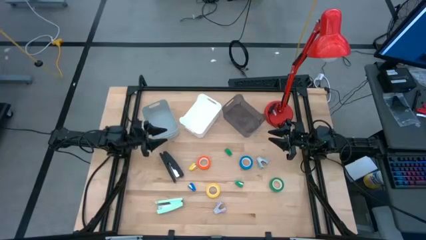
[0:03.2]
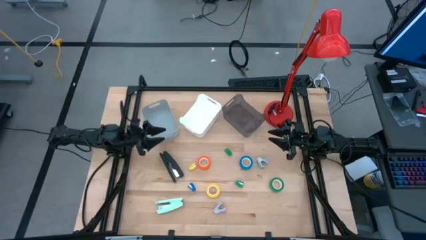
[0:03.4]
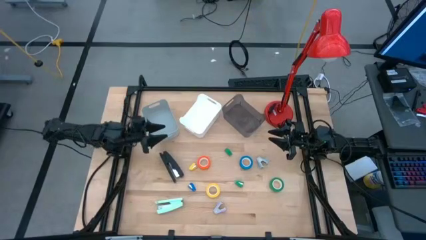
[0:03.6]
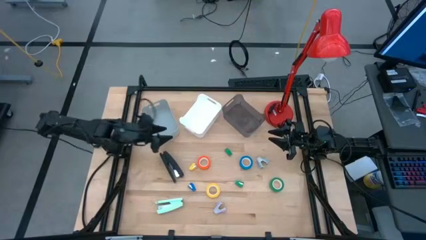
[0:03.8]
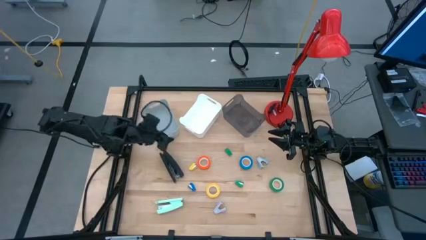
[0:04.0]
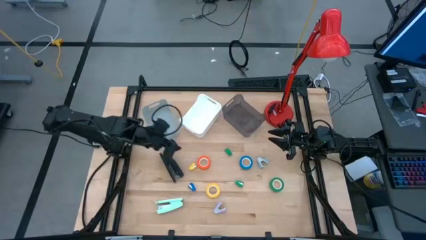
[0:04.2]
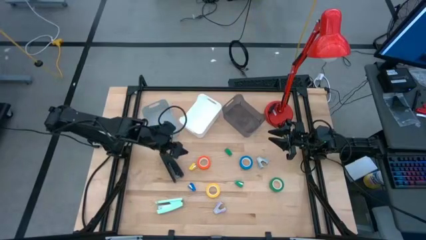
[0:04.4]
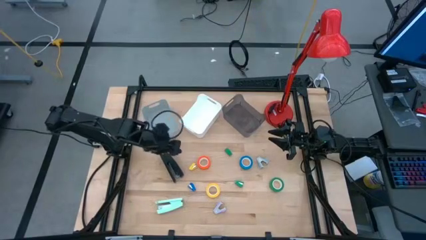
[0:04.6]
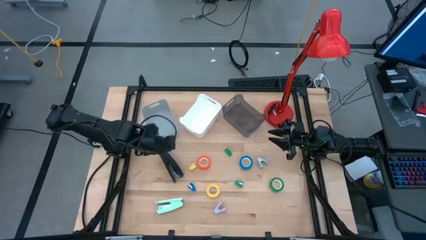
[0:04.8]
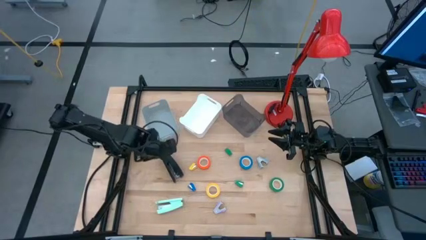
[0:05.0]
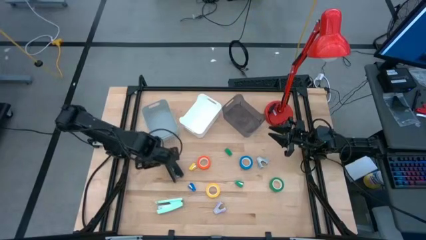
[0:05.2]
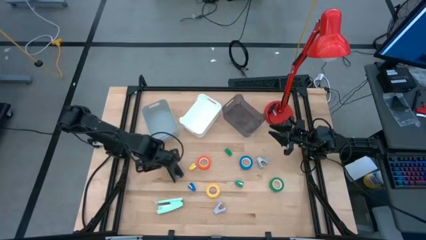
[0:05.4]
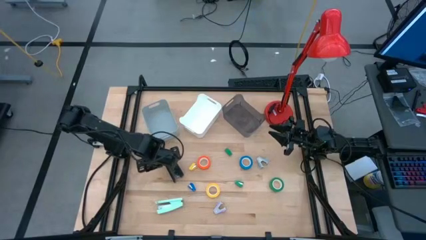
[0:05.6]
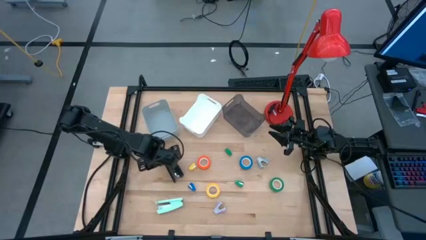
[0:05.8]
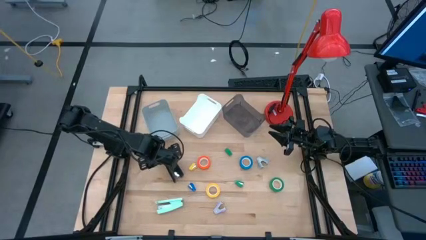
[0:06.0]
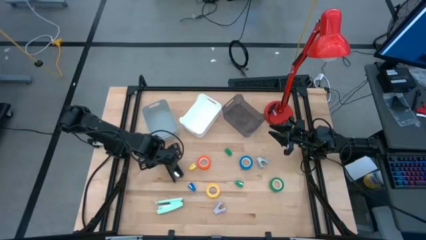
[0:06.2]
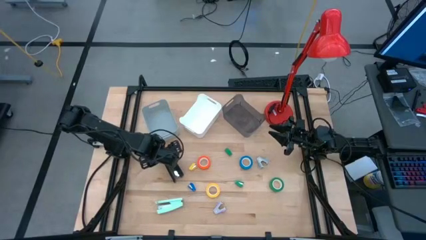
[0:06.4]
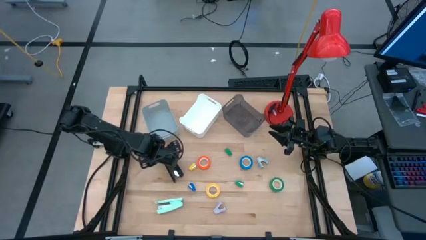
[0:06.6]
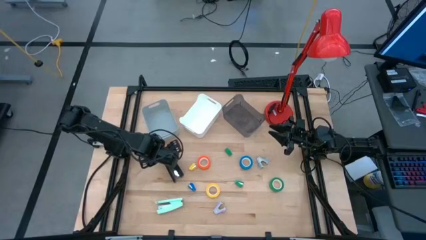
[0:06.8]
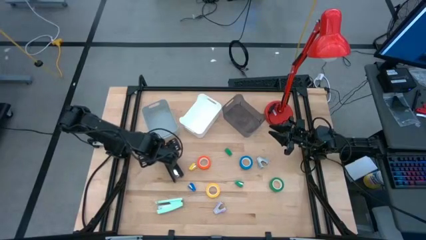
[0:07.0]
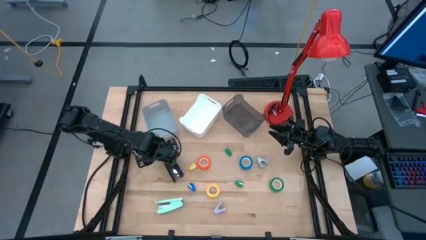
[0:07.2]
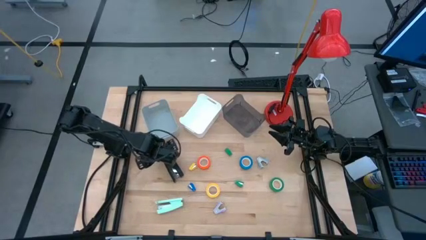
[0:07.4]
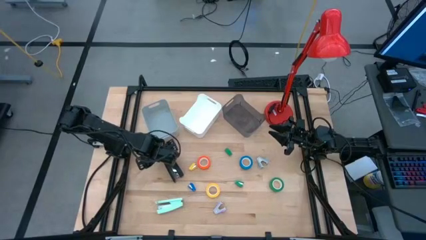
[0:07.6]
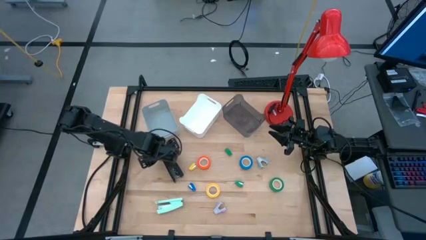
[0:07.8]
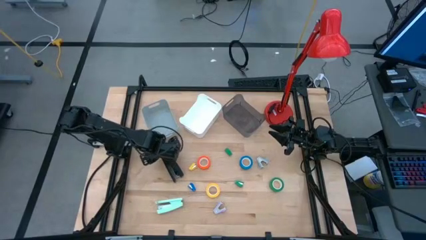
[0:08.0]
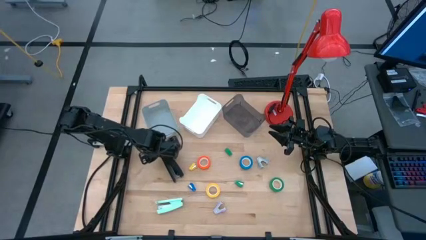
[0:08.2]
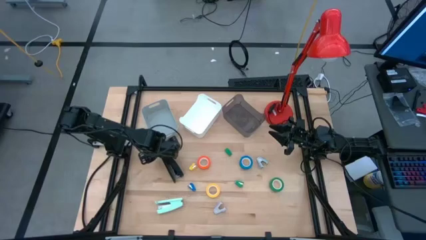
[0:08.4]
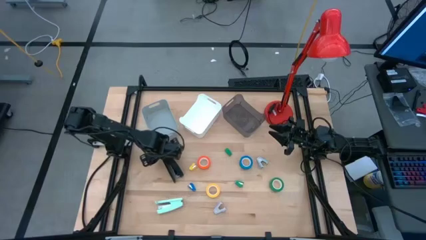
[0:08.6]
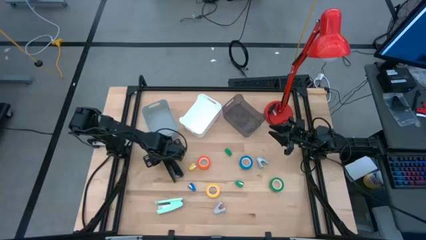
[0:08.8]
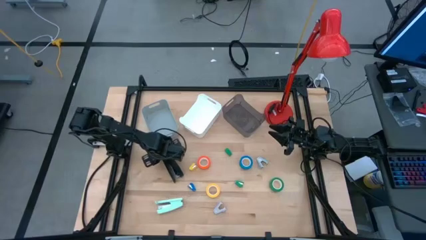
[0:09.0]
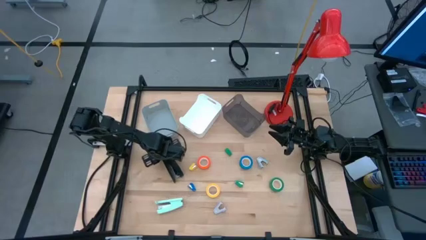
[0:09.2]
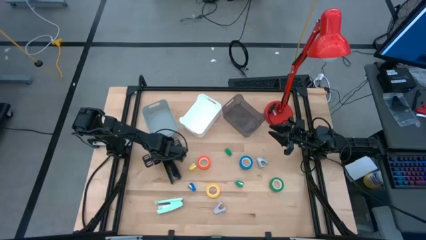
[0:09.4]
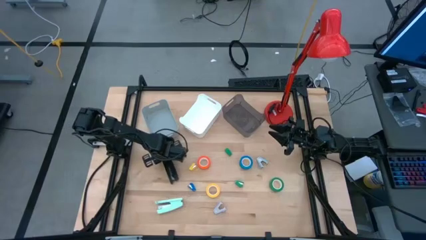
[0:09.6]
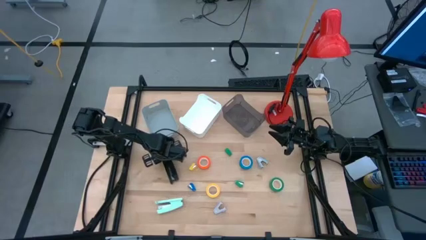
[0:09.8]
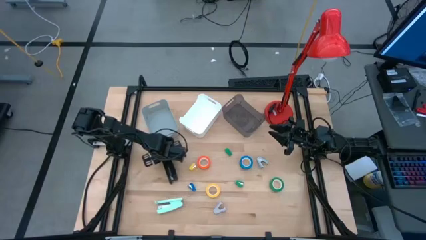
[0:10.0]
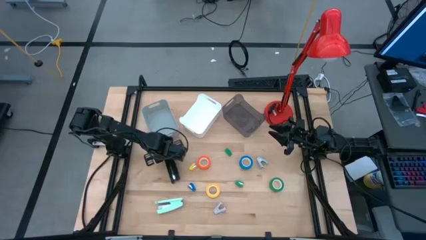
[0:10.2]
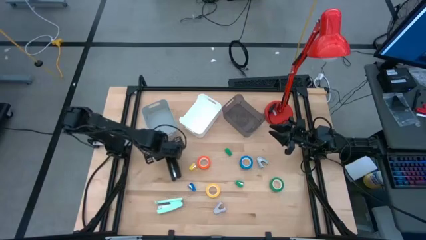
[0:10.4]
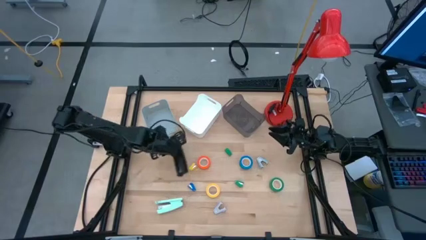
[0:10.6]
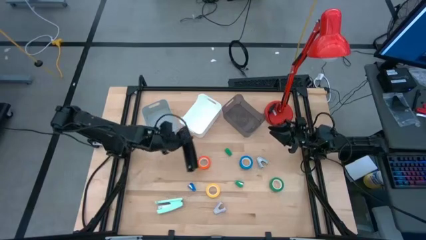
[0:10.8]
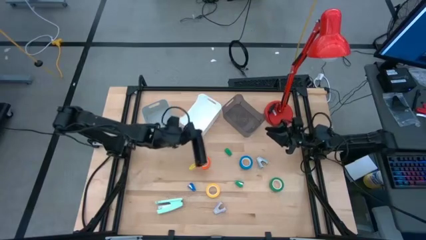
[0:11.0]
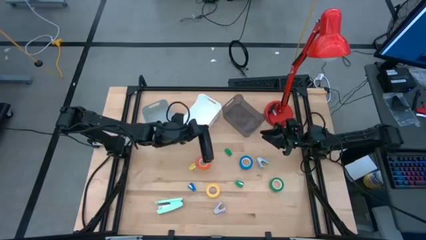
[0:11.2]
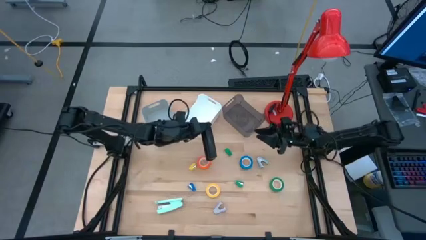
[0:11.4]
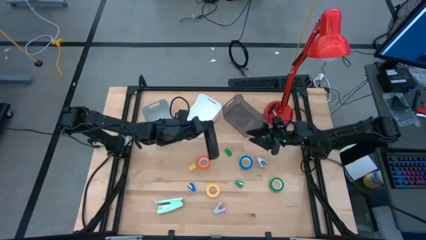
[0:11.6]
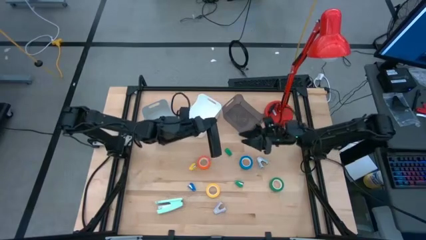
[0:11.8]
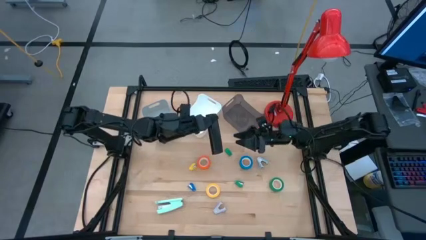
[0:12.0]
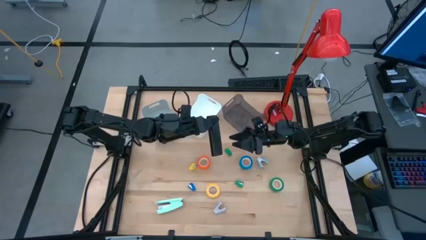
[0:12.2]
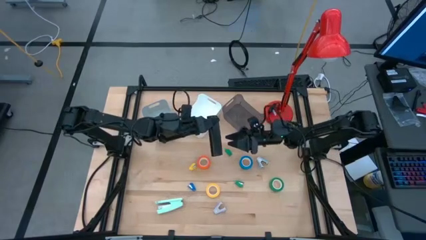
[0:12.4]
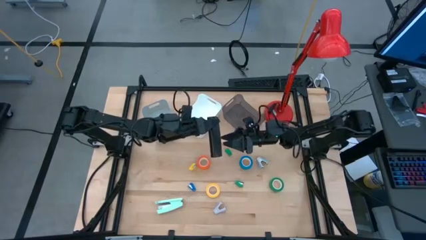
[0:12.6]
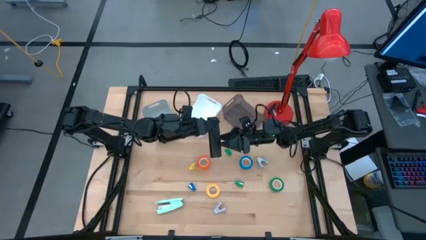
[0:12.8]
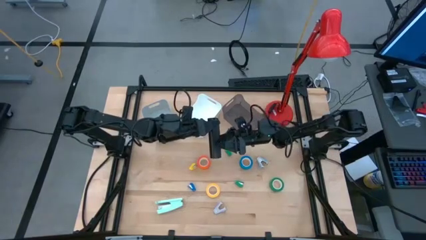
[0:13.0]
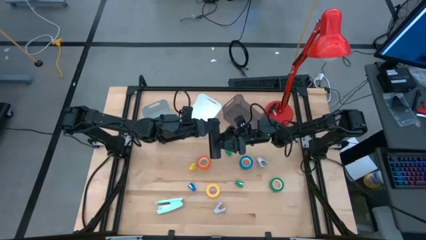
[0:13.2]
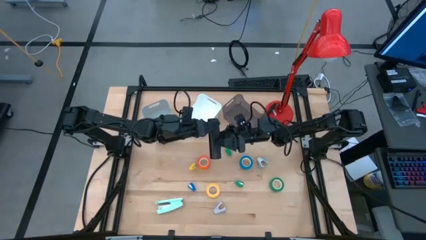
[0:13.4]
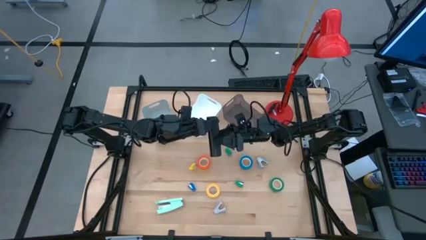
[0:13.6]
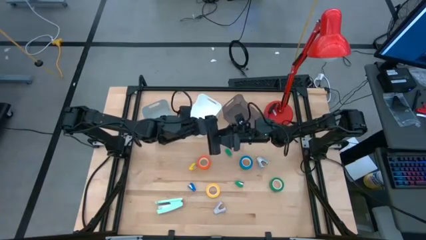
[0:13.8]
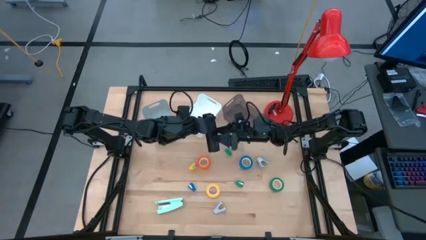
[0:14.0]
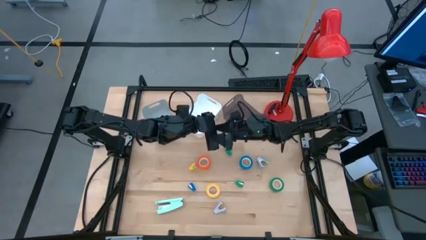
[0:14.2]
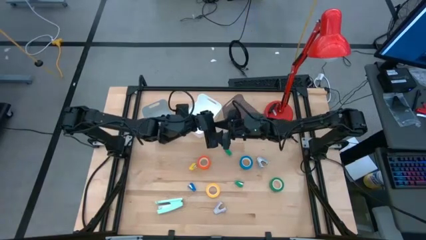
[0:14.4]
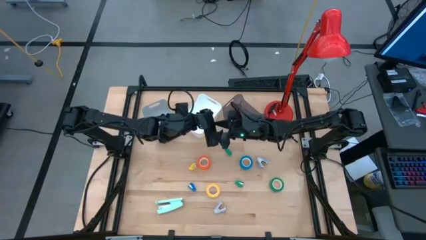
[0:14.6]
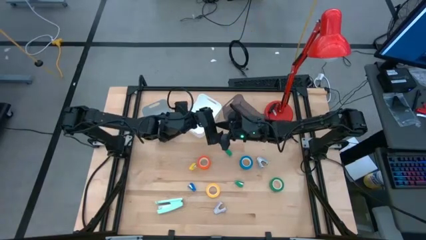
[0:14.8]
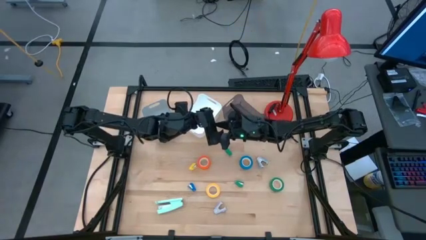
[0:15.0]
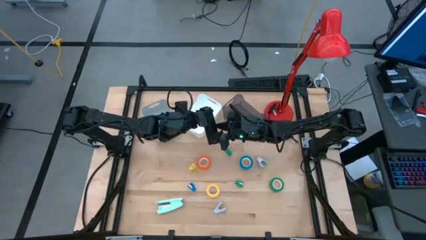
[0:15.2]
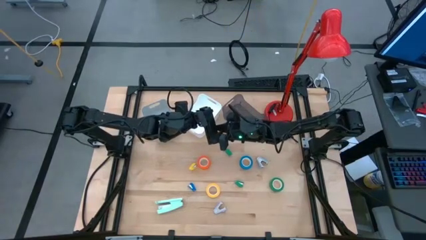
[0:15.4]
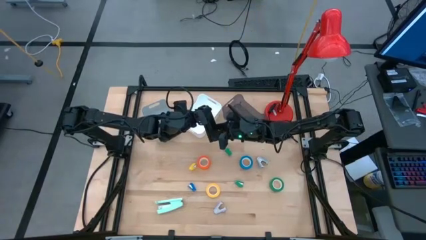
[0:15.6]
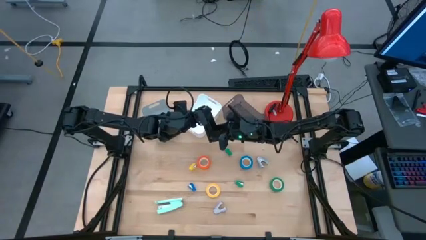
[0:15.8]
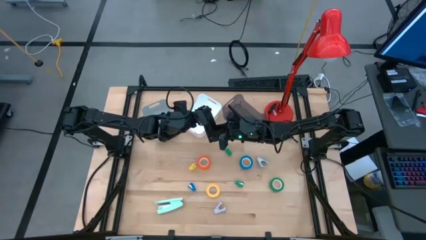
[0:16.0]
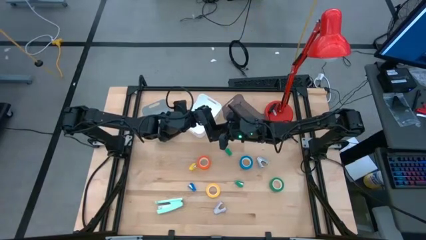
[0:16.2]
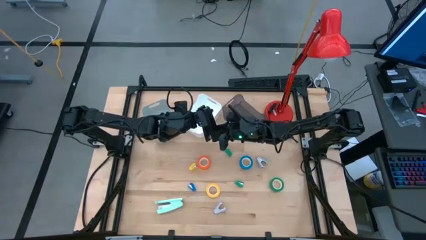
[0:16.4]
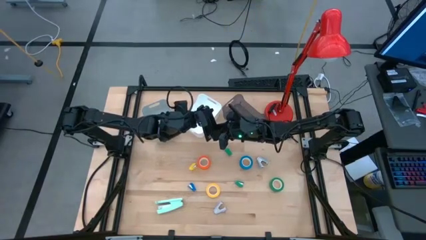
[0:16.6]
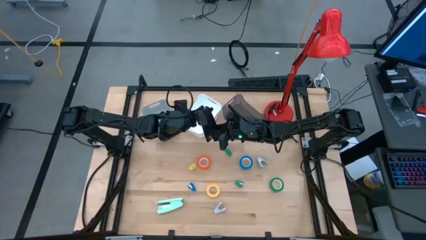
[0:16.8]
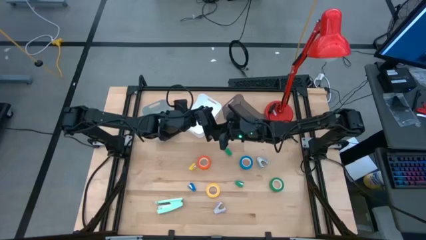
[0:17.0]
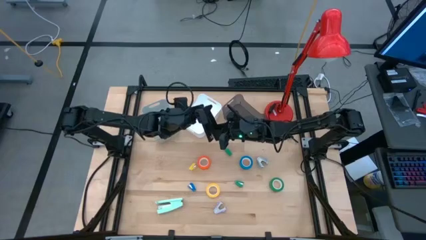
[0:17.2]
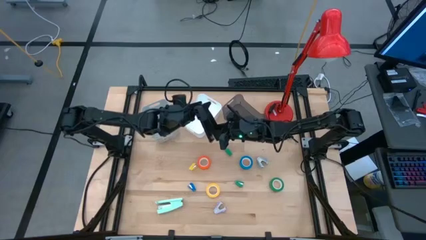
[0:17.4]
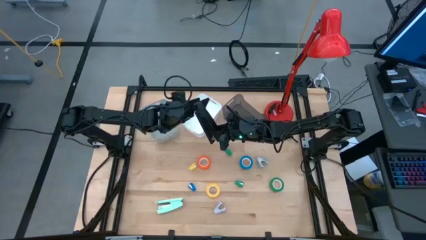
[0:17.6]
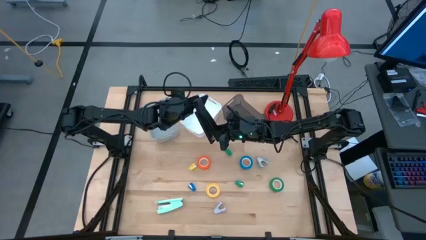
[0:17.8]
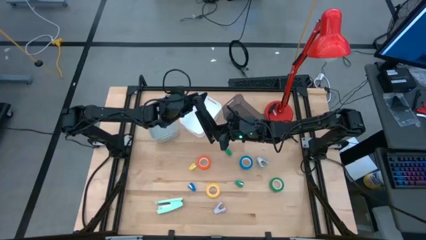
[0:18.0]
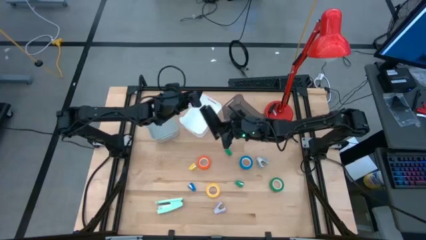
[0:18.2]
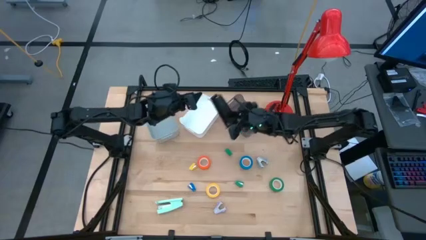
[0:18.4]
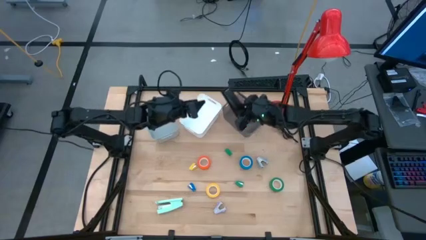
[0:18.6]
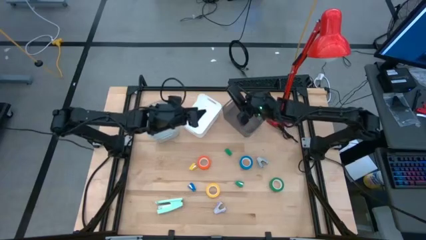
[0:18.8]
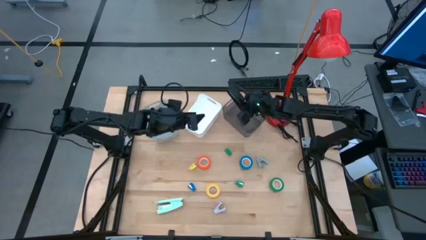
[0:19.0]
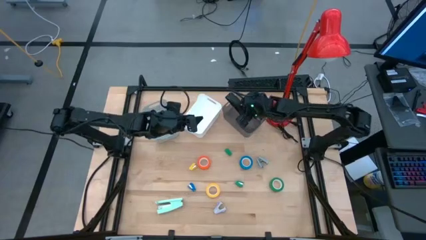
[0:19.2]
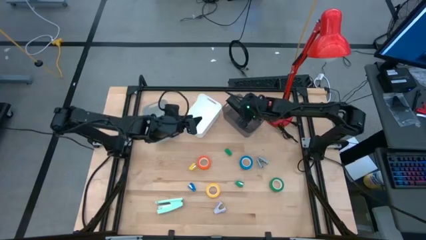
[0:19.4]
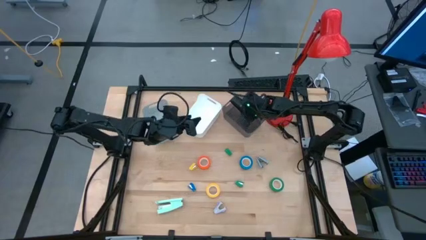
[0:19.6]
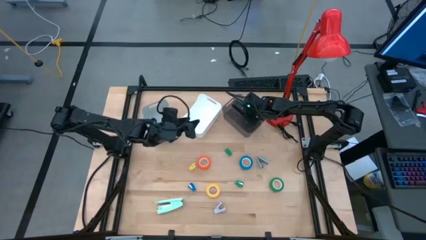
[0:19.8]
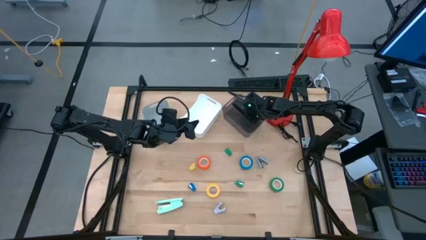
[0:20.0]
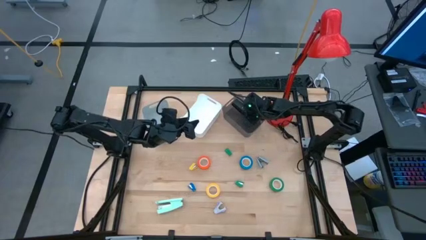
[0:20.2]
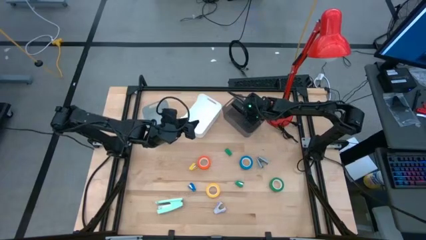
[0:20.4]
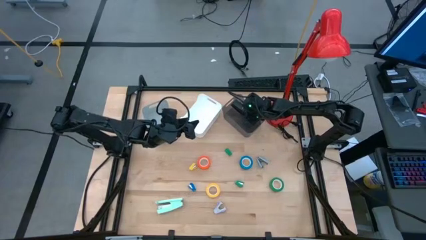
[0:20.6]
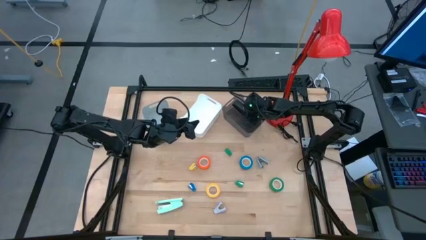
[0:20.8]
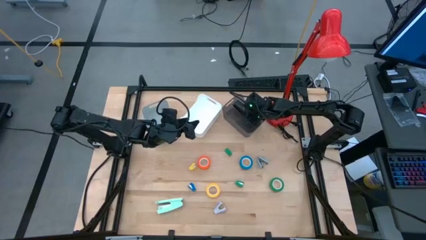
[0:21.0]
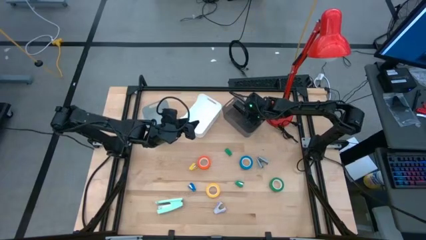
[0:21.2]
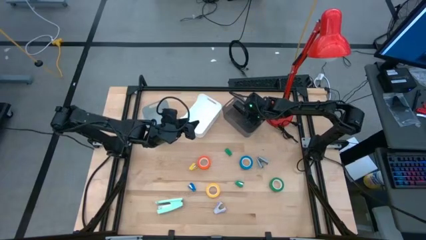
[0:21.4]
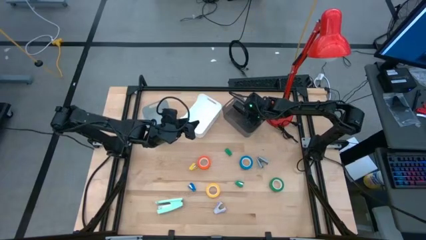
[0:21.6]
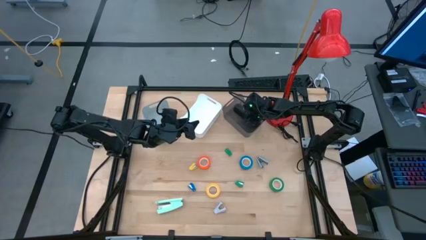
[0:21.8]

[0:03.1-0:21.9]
Task: Pick and place Stapler, Stapler remover, tape
Put the black stapler into the black bin
